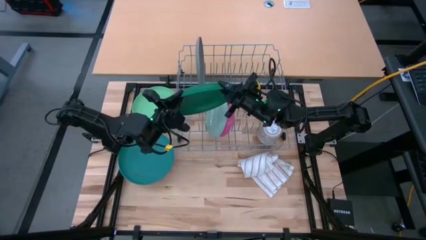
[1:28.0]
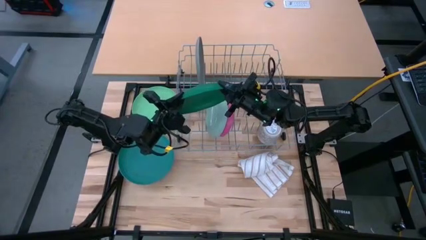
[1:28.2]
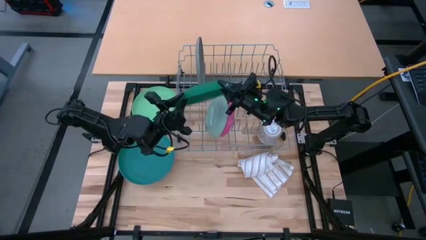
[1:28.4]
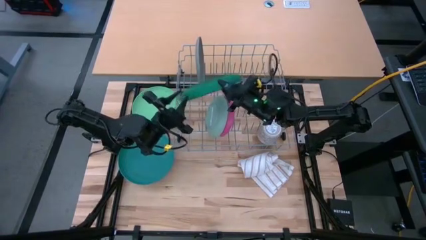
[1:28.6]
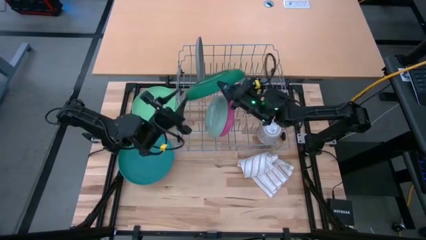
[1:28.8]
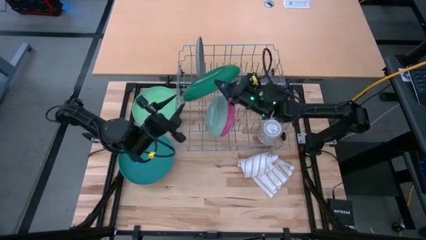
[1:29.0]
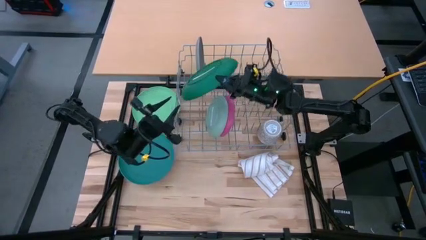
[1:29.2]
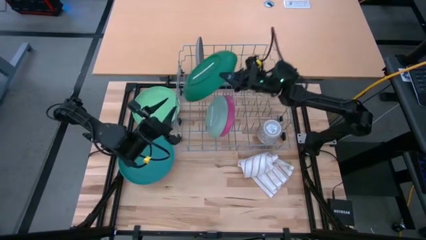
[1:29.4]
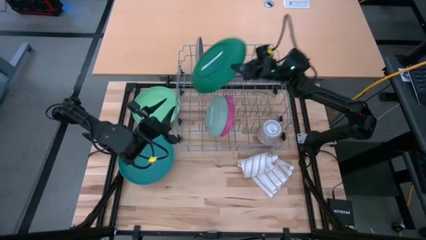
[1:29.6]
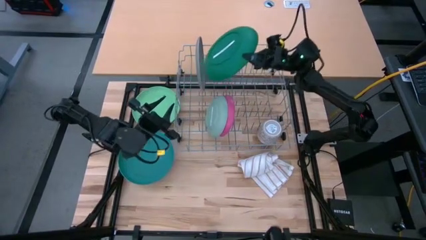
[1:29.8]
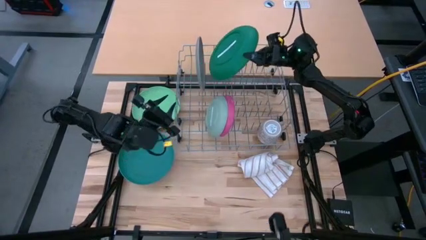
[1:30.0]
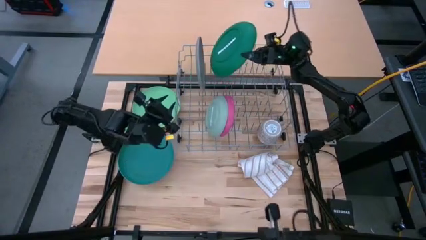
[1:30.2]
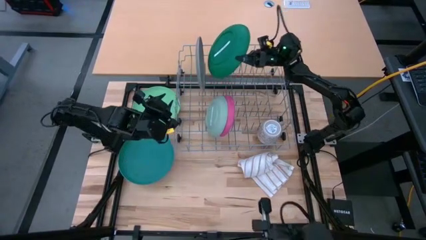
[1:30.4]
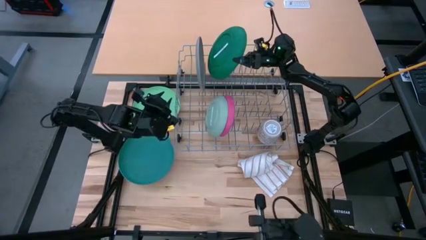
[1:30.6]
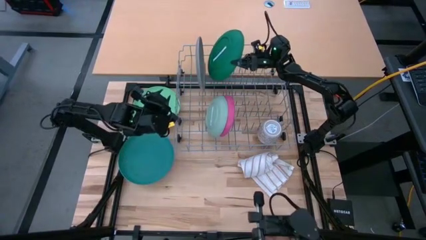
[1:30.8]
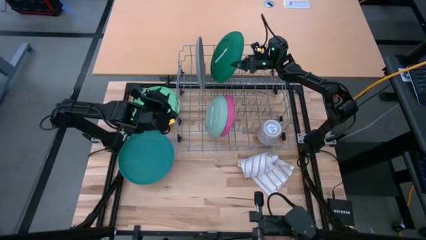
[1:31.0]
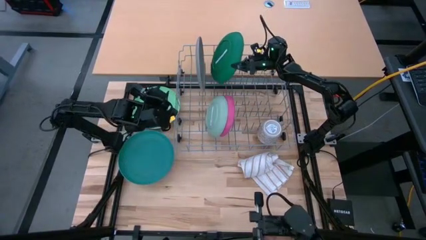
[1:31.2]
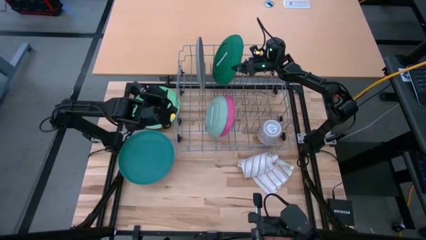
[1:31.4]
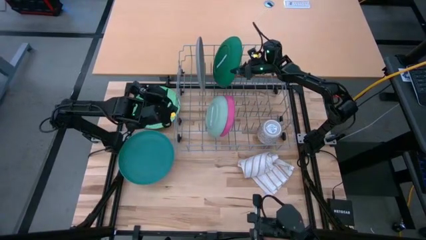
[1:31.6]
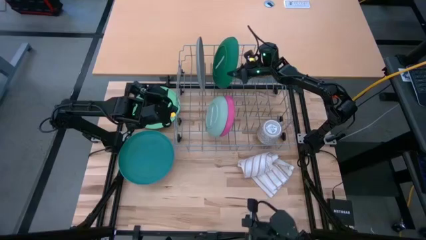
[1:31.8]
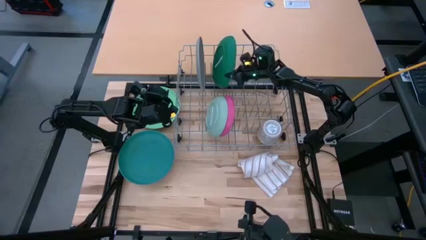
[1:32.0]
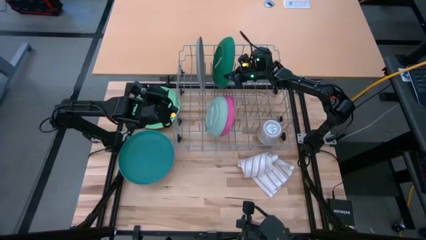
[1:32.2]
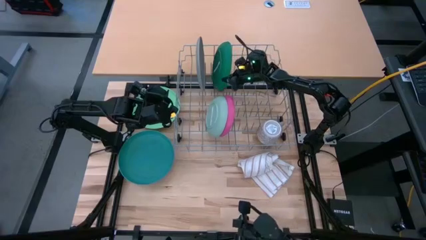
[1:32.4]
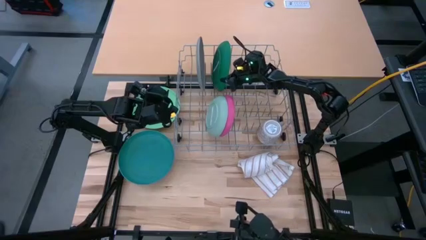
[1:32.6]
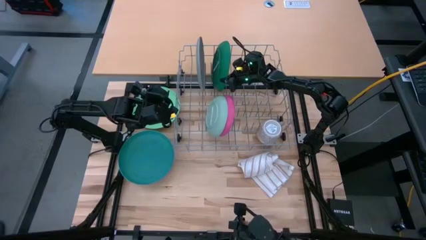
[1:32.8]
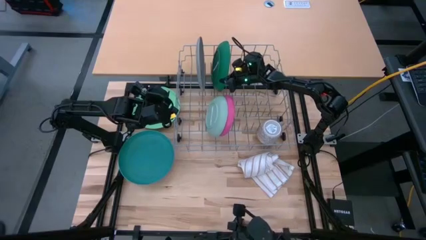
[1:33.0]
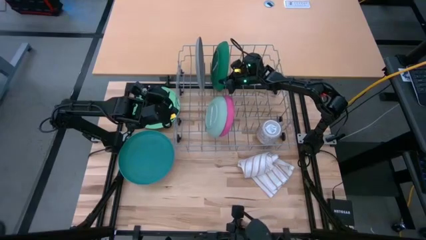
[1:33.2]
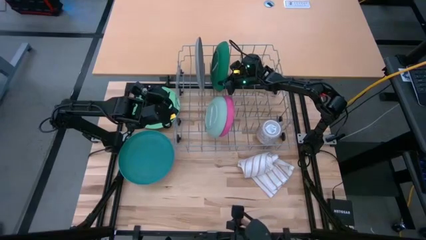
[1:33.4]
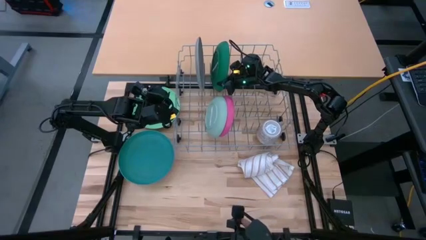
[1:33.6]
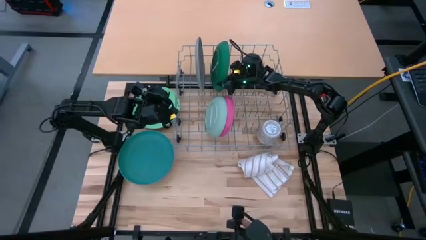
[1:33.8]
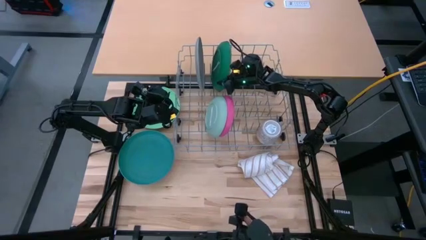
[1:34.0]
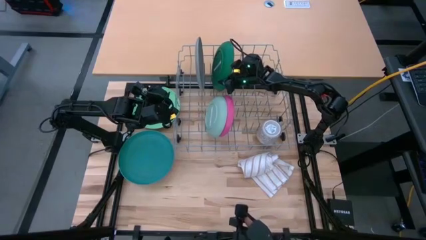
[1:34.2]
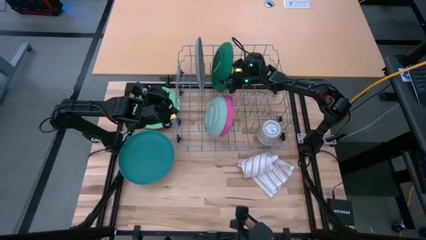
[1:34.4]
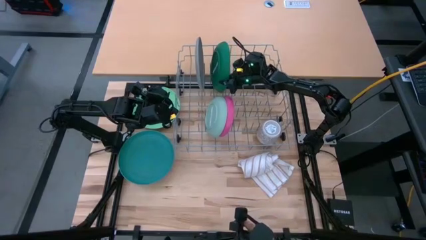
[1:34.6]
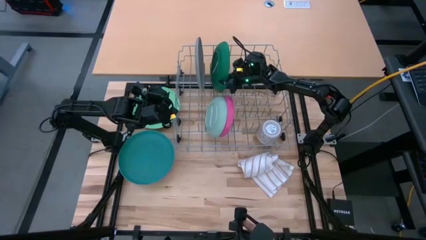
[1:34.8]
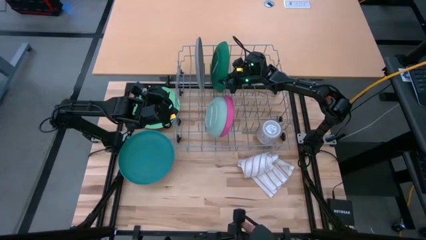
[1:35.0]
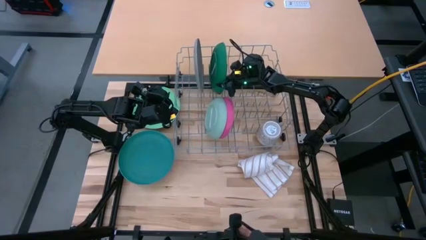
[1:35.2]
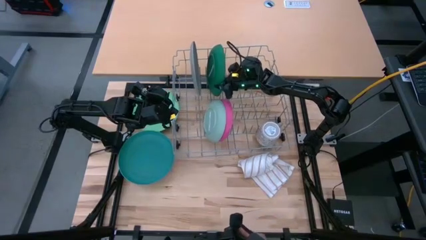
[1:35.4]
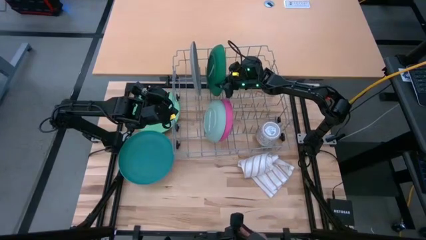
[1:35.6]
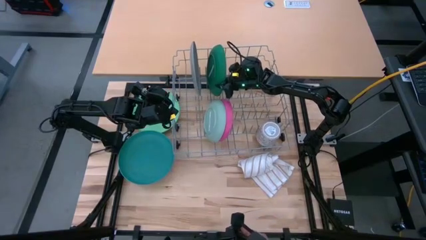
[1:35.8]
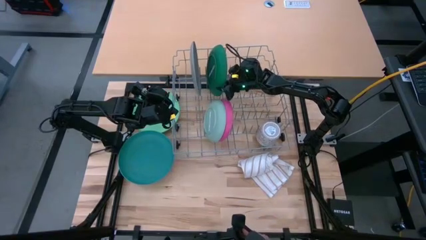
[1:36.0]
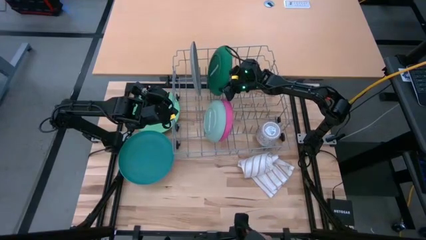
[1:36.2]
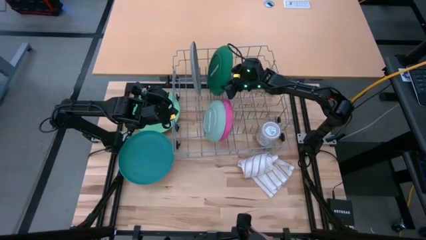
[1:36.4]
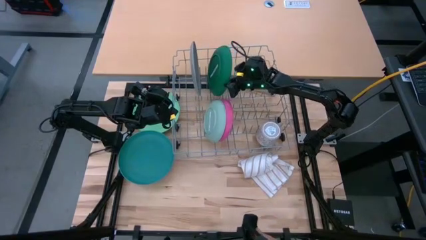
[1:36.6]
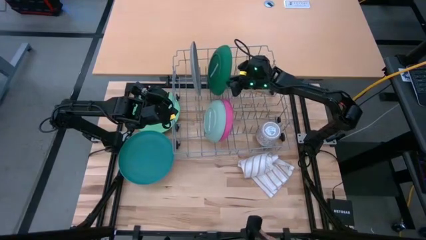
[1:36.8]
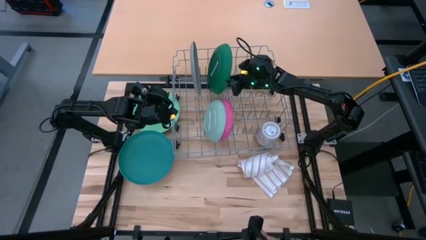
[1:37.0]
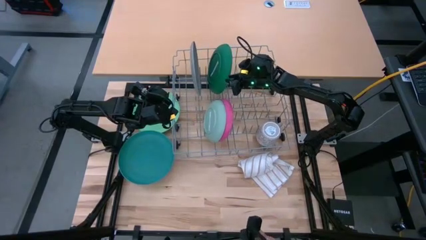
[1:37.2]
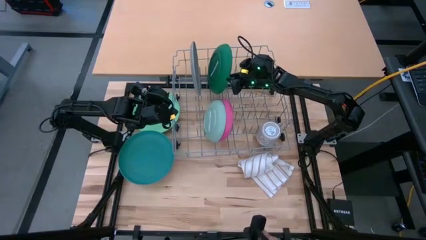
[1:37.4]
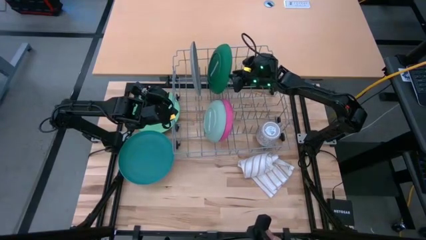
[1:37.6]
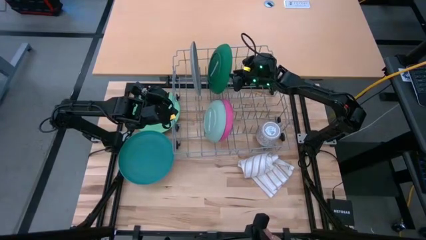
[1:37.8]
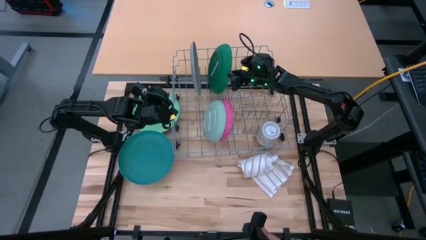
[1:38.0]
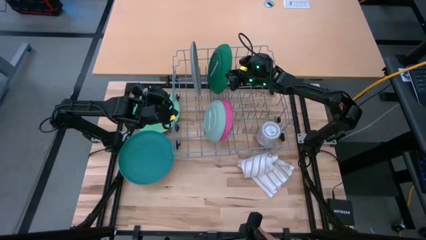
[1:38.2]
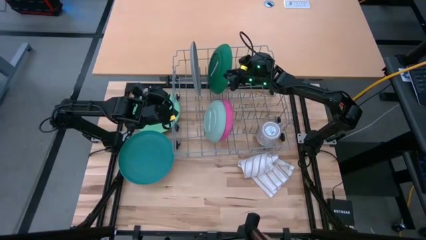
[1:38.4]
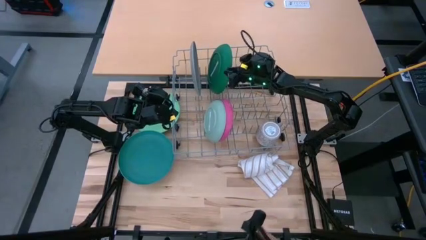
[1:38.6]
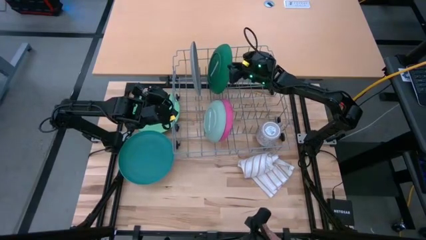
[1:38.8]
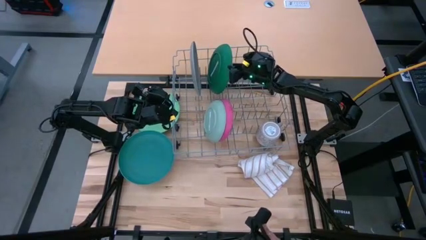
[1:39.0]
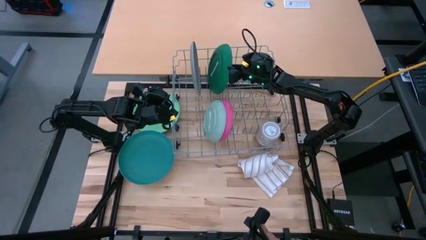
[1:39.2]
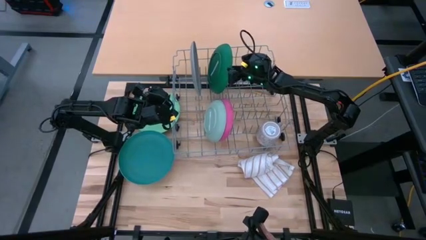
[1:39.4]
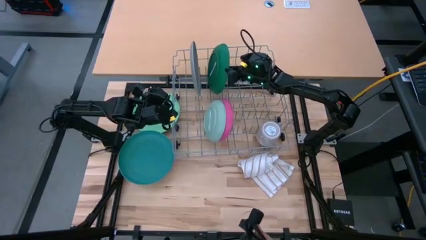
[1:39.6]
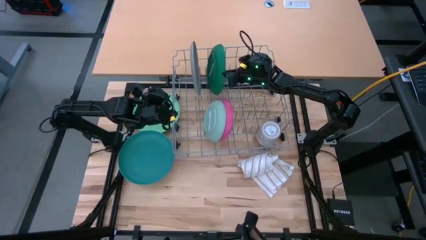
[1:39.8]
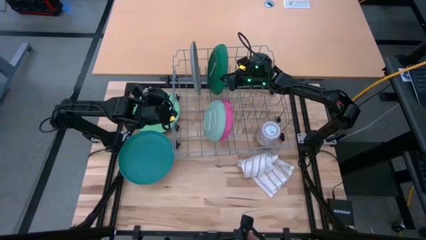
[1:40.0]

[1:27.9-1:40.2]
Task: Sort dishes
Put the dark green plate in the dish rack
